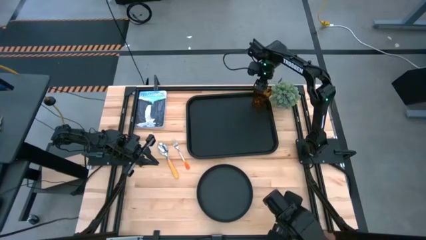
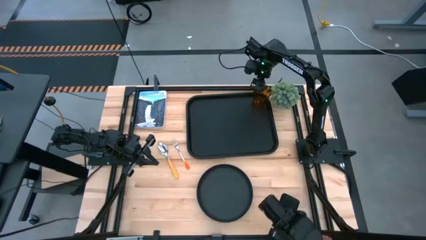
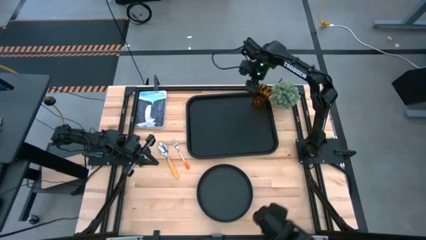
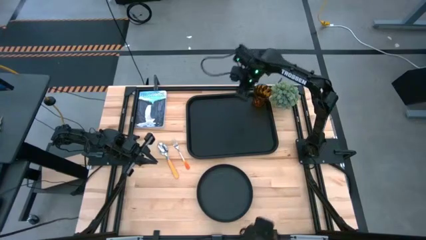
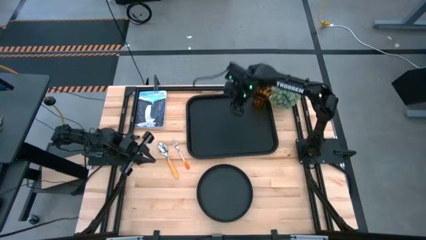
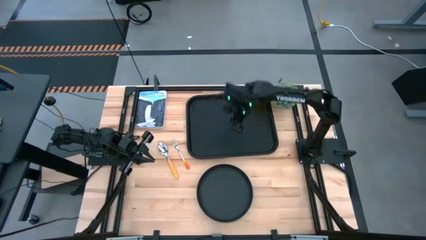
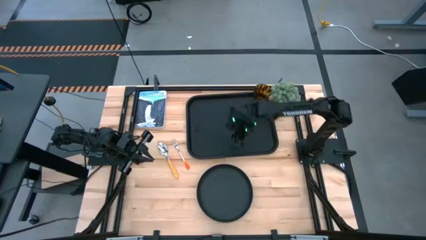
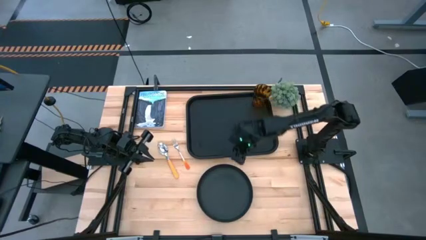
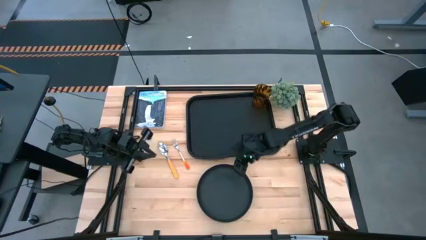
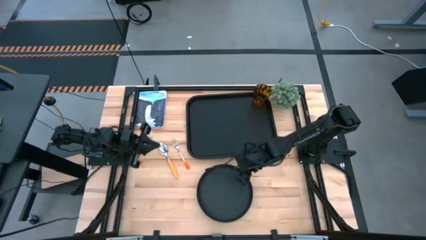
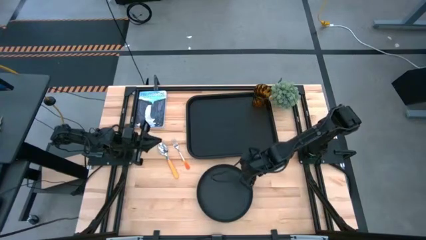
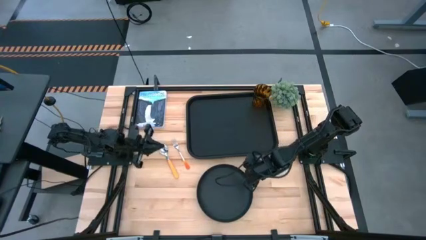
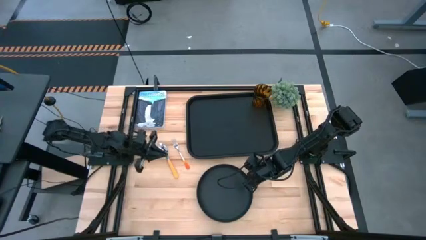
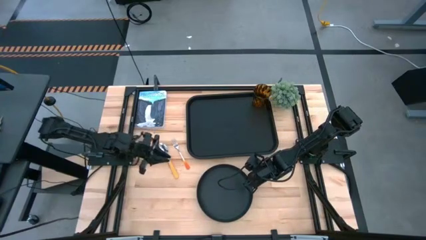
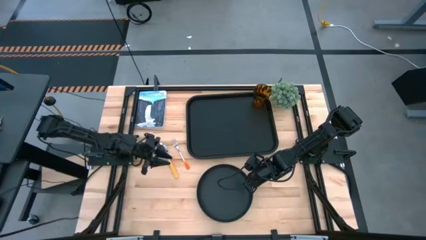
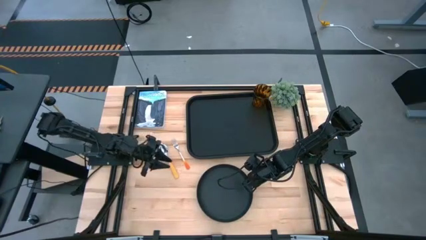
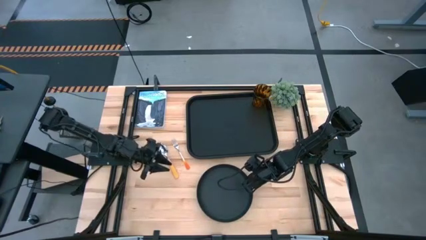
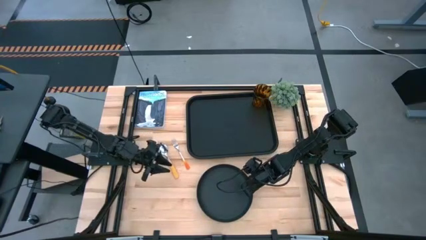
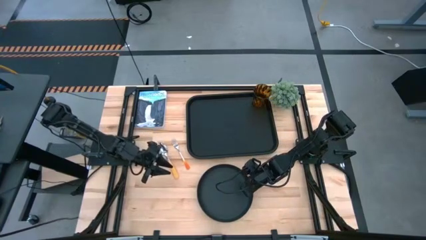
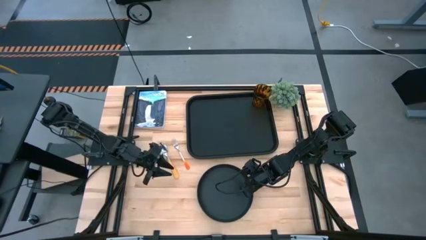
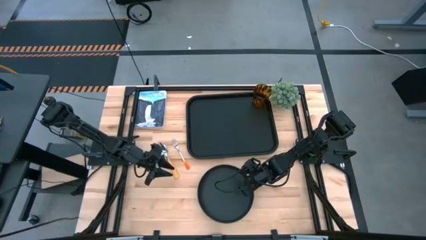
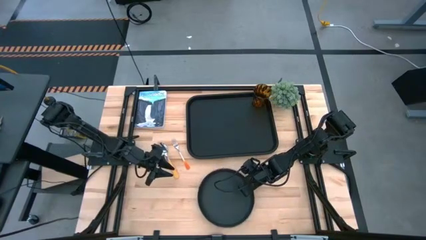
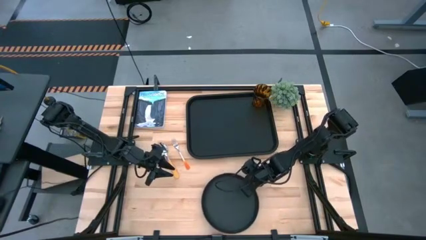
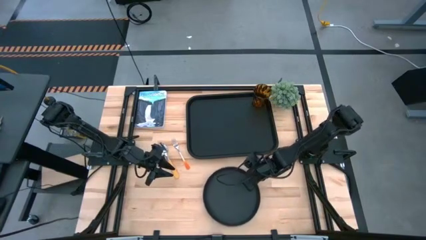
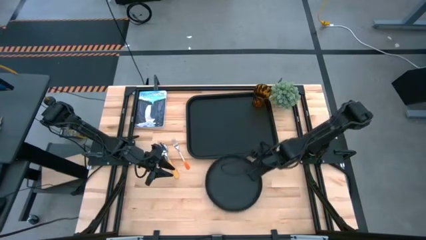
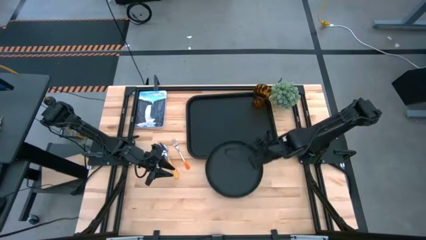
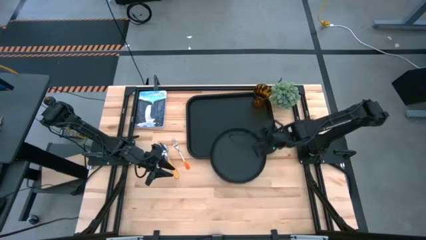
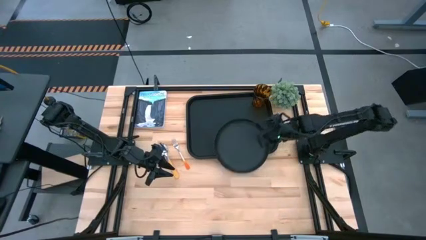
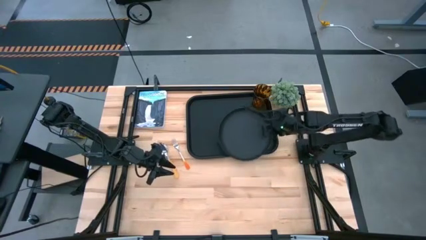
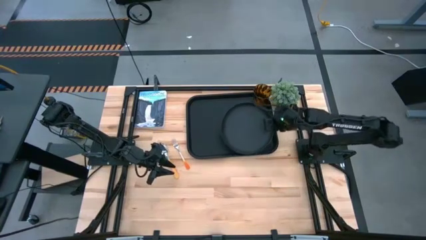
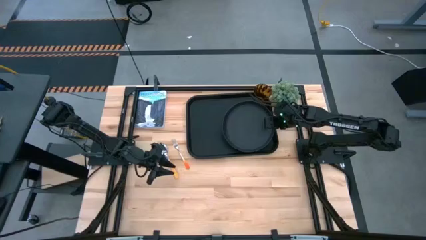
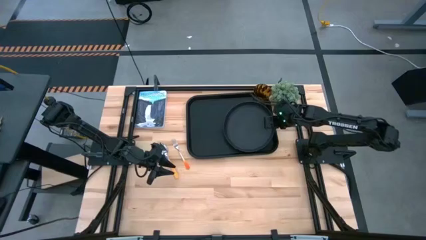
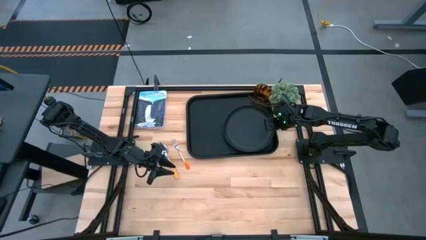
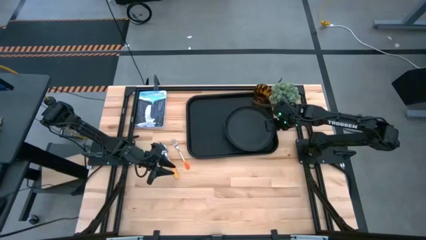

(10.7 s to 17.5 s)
Task: Pick and place plate/cup/fork/spoon on tray
Put the black plate on the black serving tray to the bottom of the brown cup

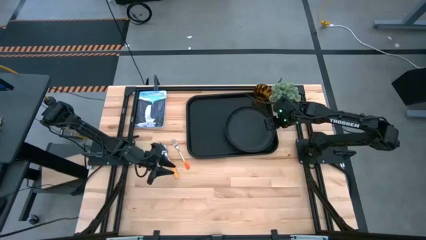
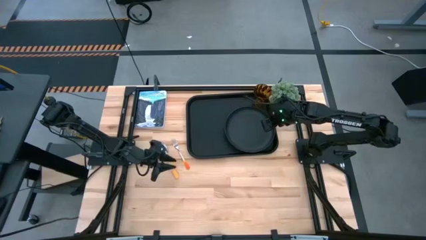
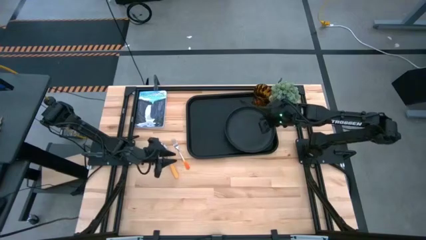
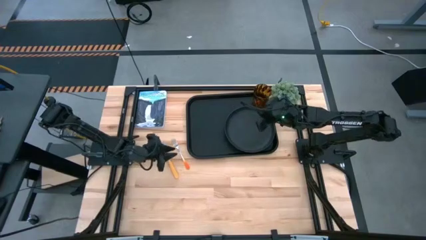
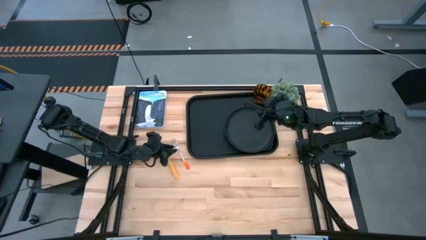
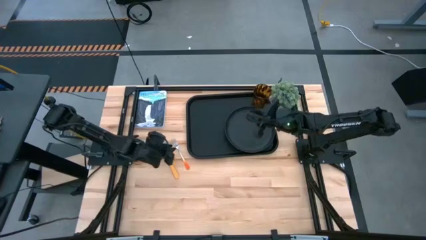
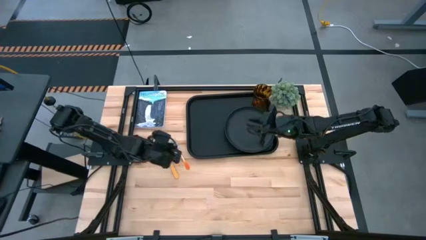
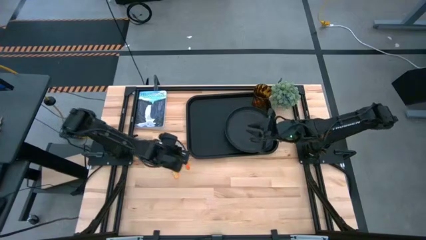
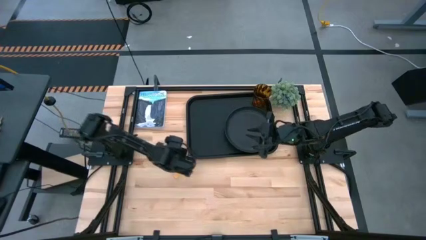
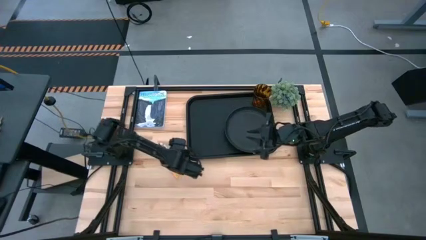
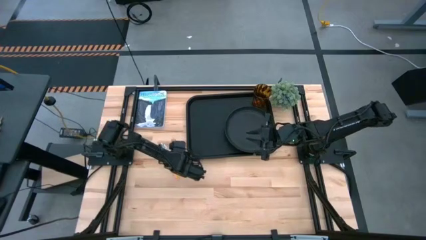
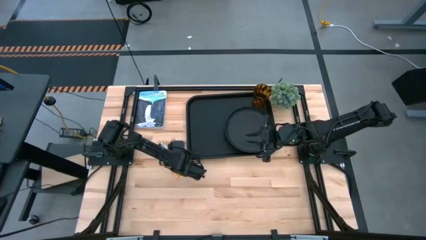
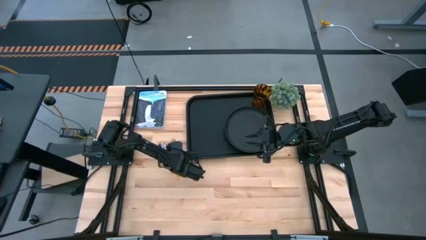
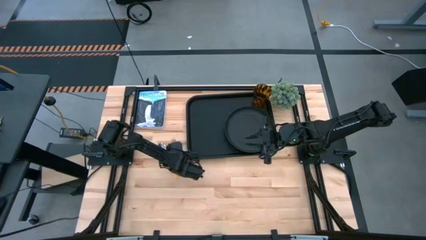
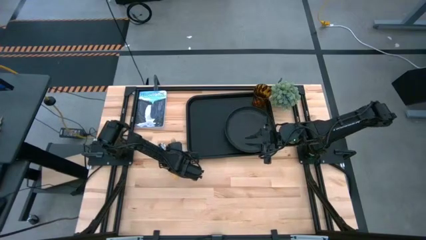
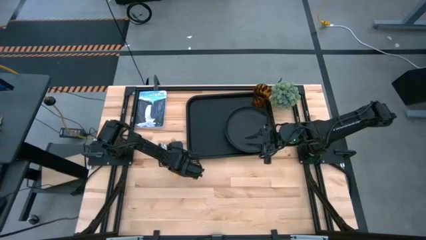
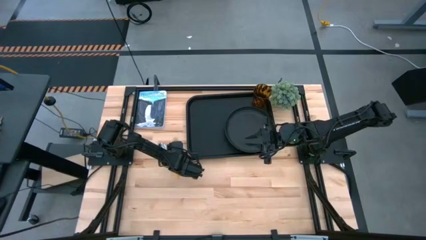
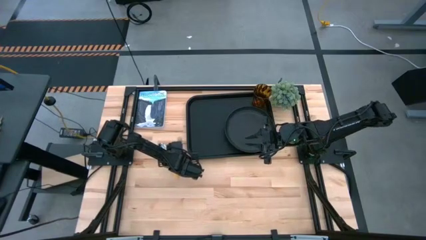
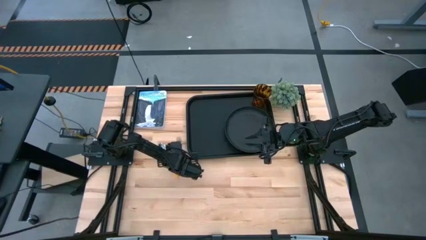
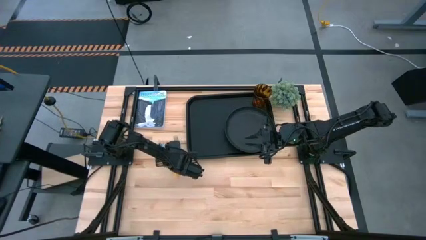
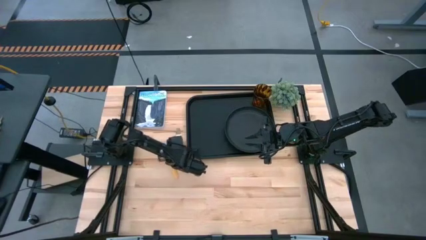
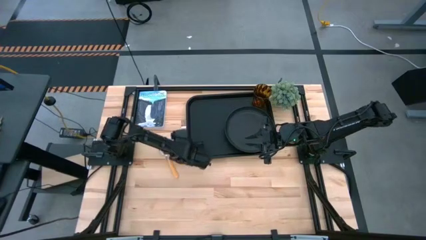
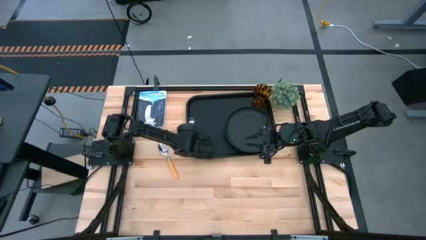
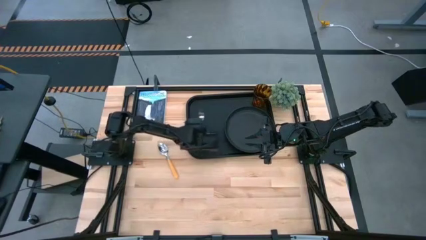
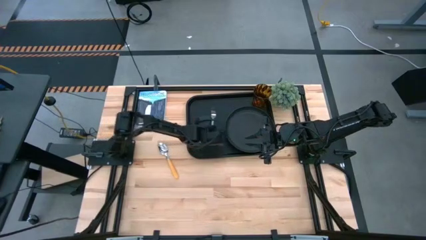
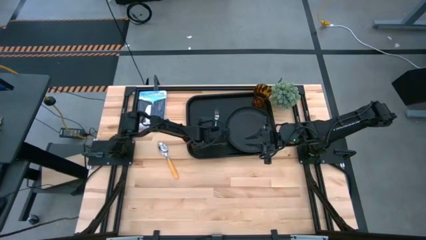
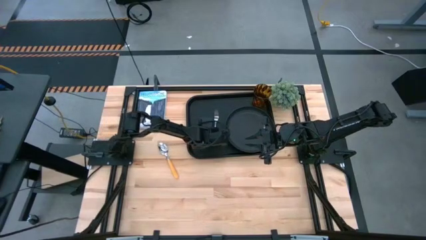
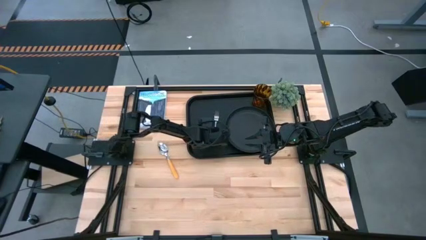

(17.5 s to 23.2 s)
Put the orange fork on the black serving tray to the left of the black plate

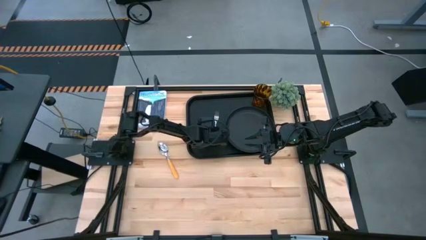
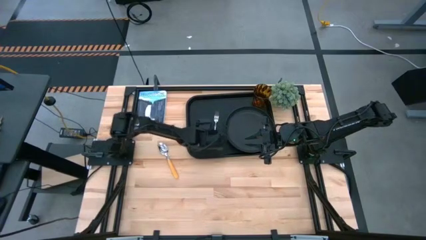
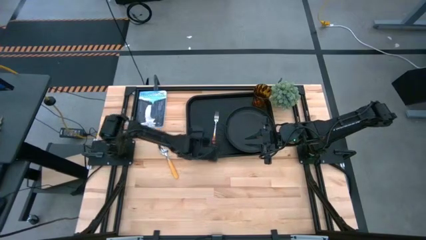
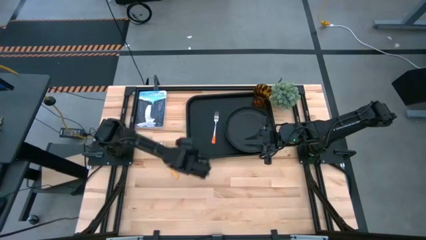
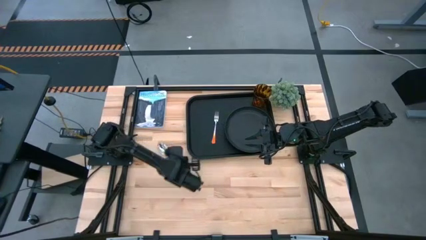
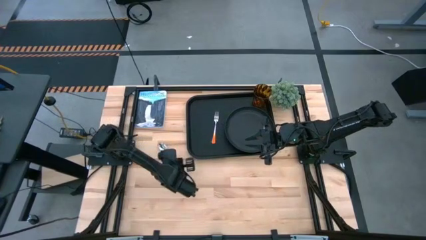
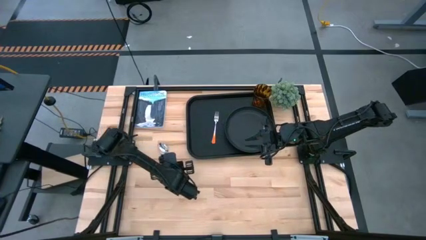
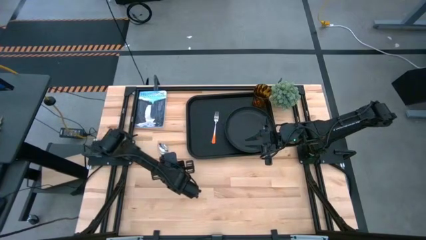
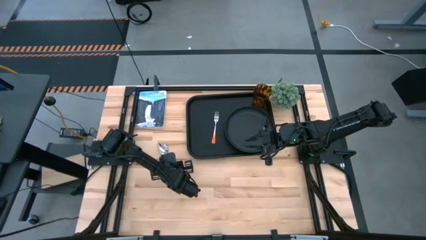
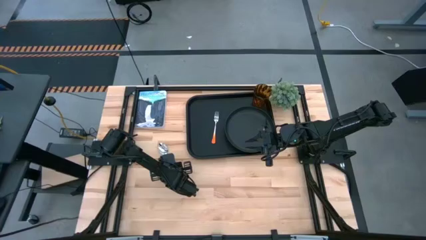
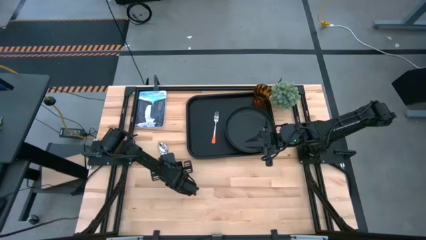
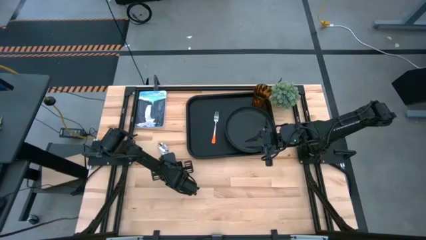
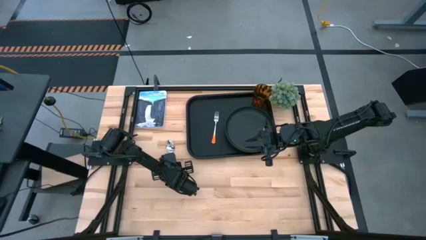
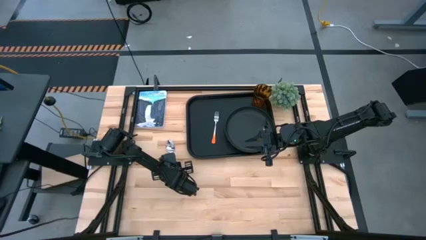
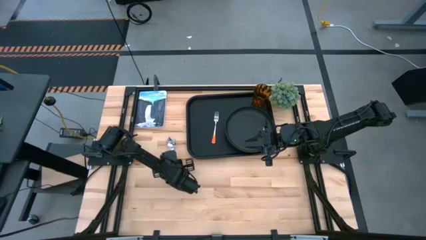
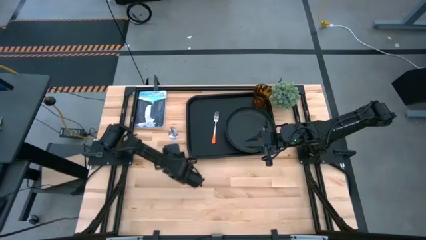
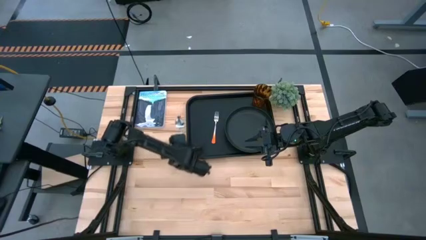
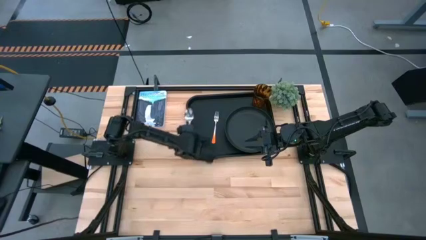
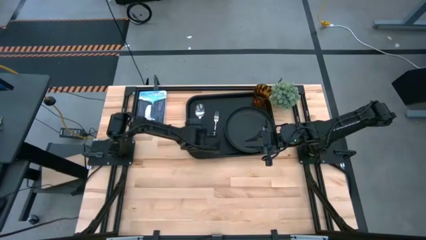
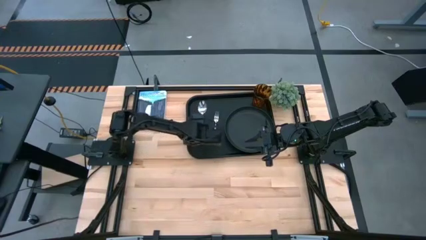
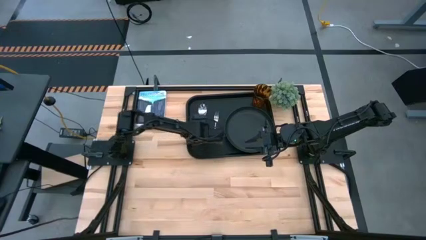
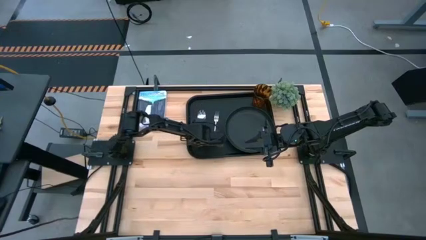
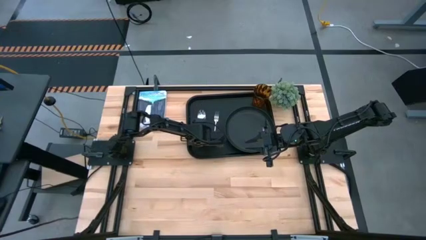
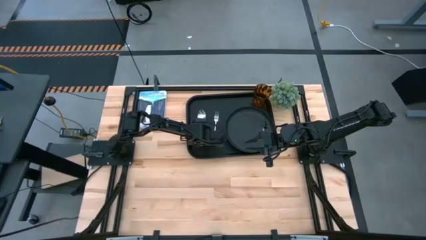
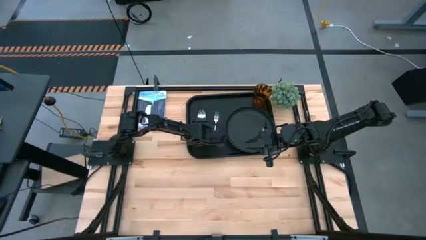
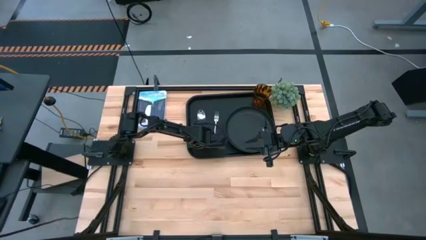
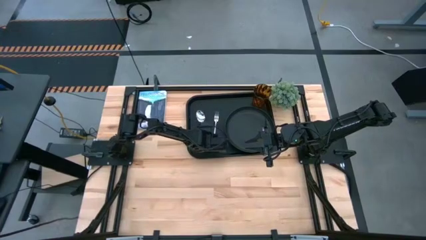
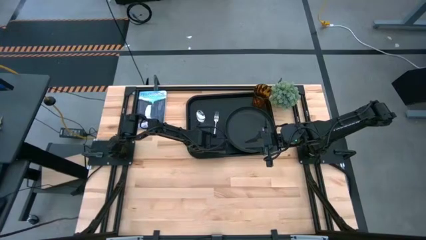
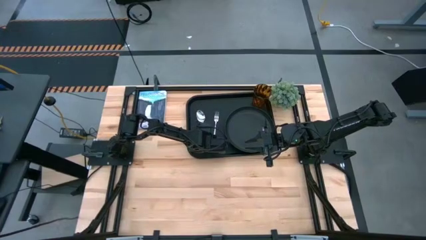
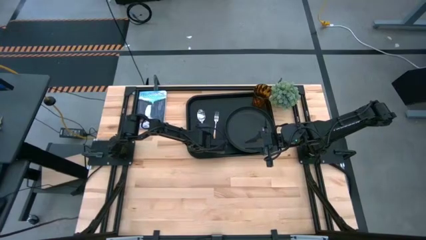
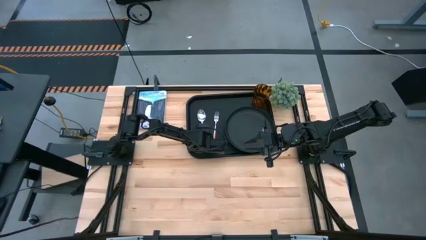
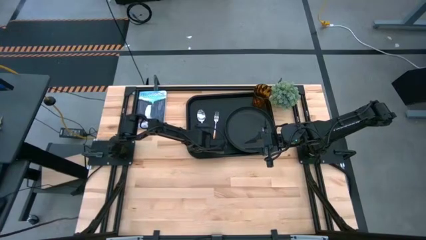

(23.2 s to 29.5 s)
Put the yellow spoon on the black serving tray to the left of the orange fork
